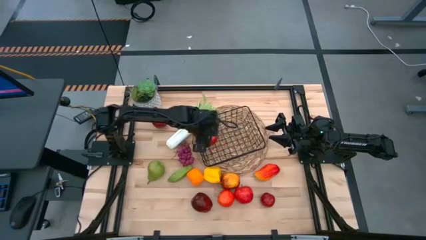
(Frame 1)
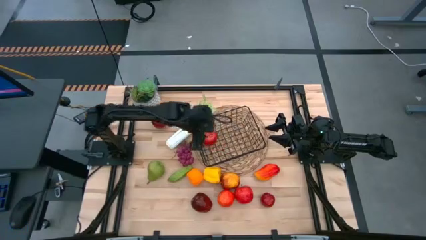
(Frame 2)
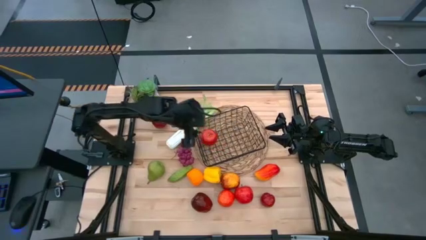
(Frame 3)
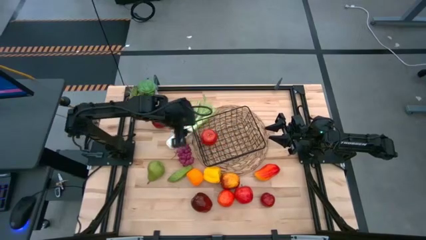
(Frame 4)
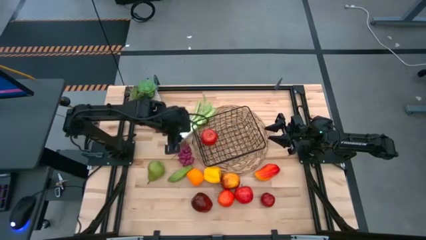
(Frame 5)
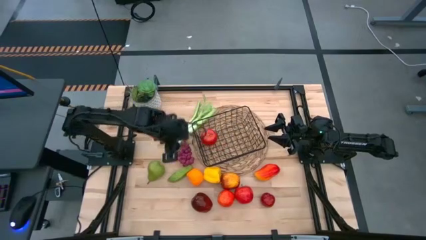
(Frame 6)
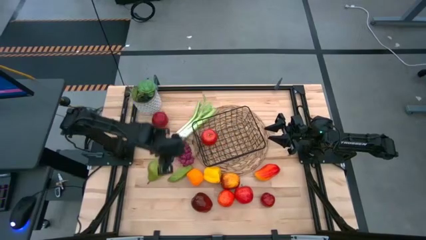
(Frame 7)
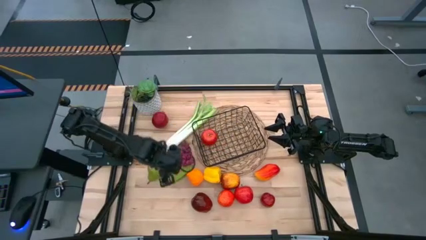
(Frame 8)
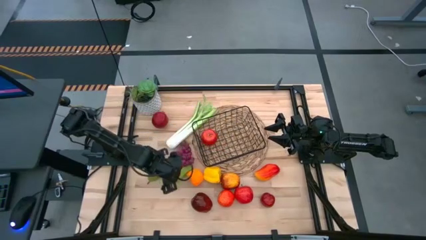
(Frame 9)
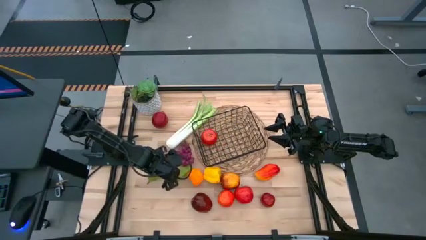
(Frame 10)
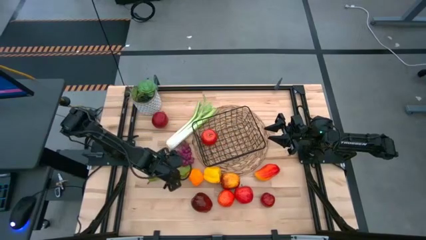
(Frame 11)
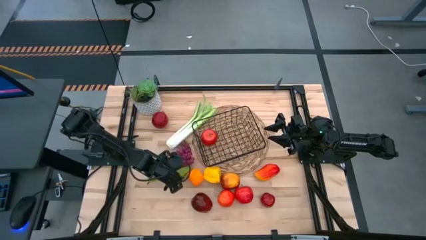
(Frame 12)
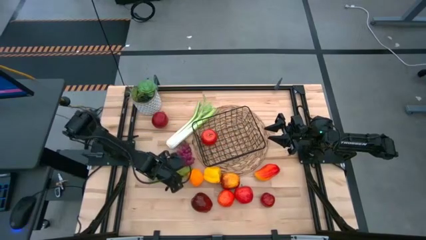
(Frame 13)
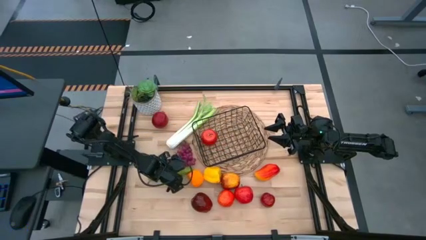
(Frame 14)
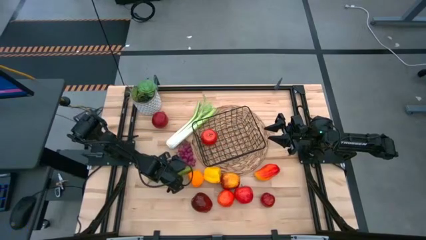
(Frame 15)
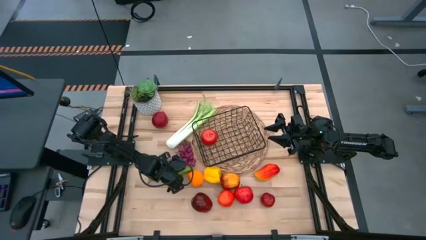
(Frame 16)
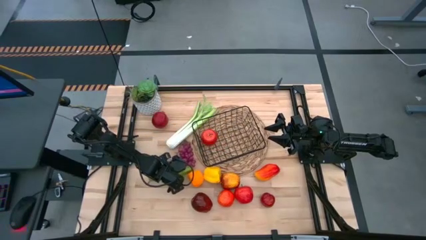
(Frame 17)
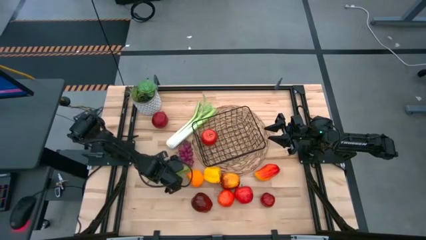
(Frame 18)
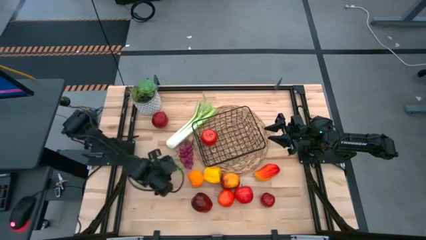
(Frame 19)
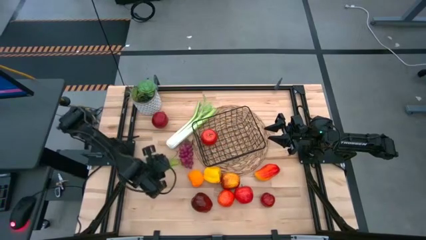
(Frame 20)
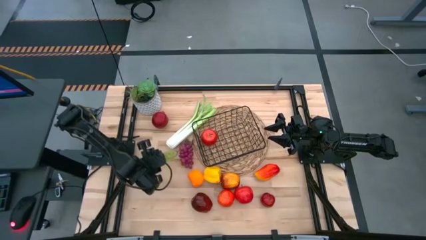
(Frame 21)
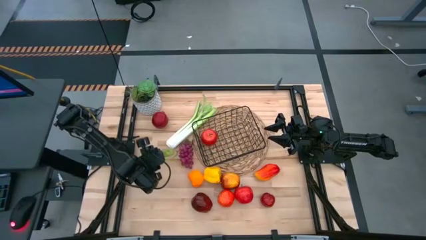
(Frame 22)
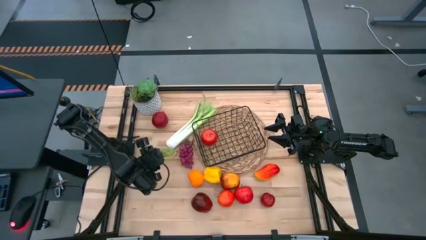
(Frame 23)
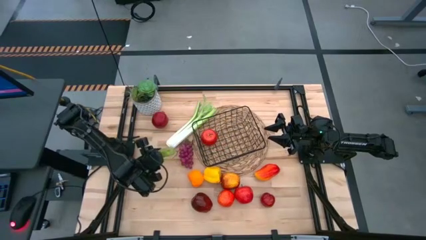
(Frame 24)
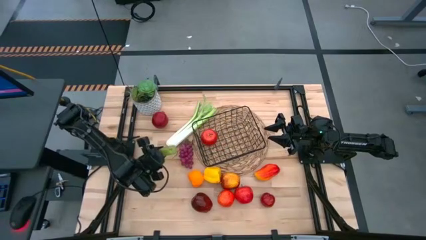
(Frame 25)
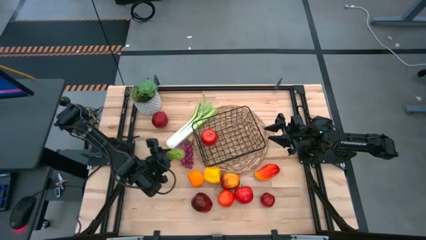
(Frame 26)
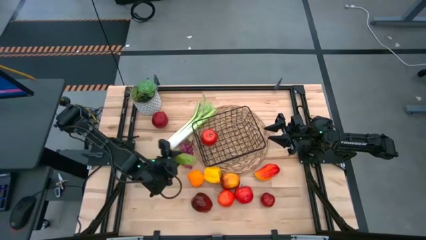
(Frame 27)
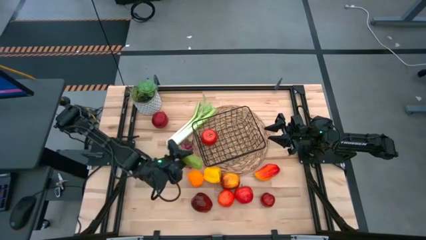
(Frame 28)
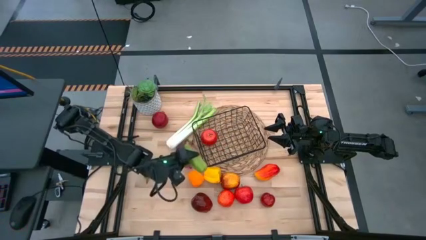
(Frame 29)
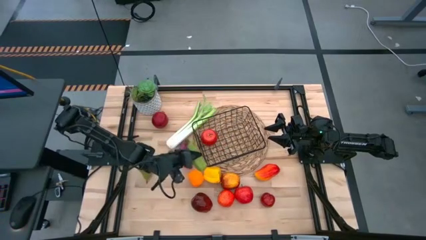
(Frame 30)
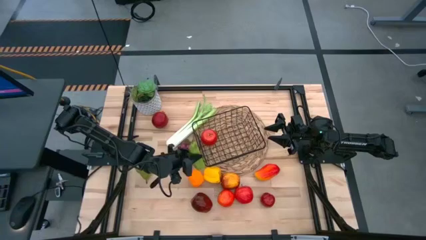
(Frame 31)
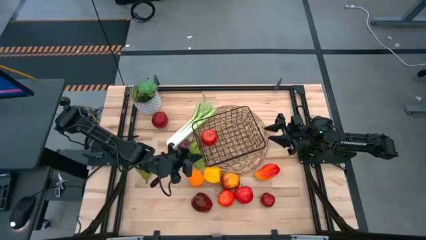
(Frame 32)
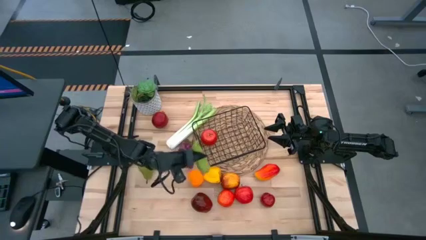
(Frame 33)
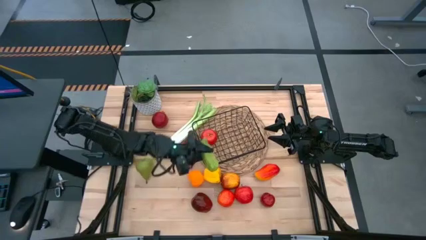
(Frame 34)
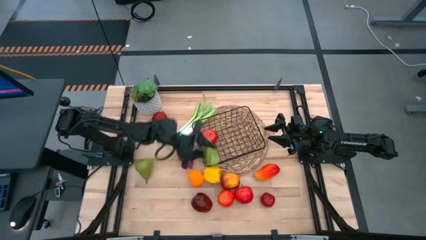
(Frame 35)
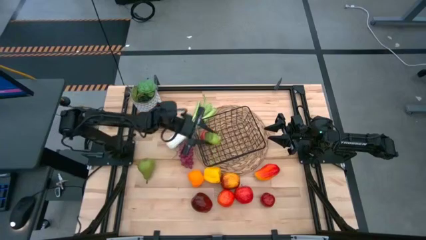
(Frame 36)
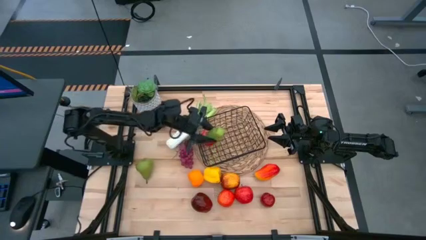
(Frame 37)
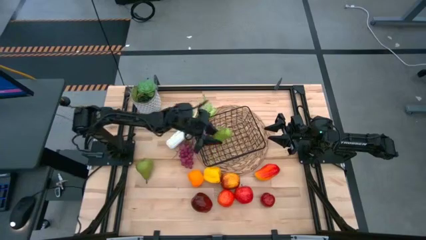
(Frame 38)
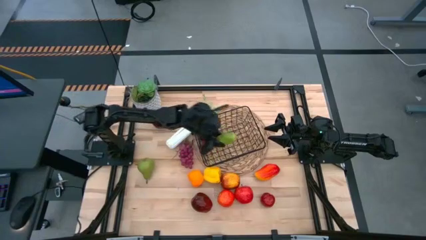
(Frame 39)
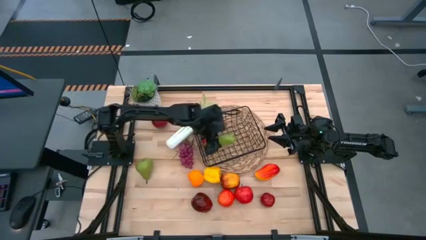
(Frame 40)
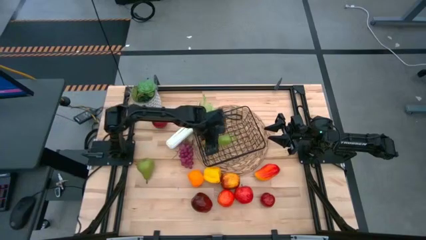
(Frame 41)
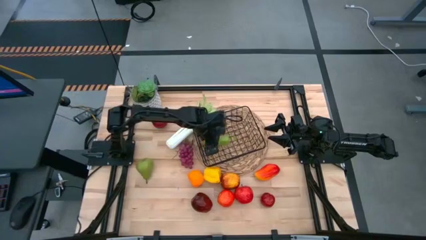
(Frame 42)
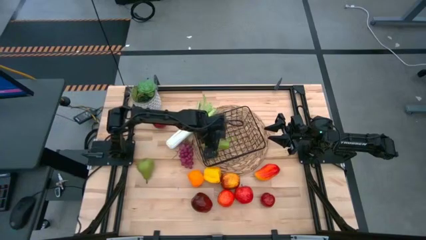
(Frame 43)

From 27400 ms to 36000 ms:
Task: Build produce basket
Put the green cucumber into the black wire basket

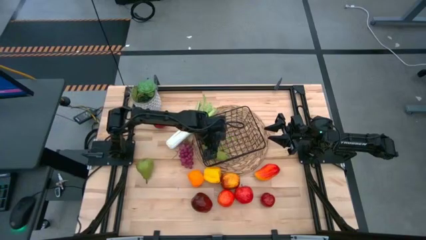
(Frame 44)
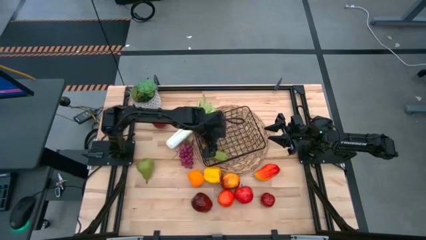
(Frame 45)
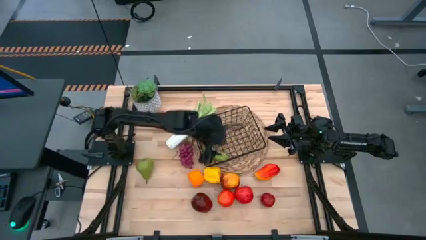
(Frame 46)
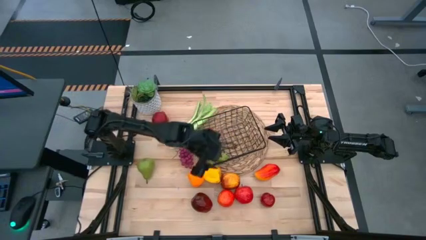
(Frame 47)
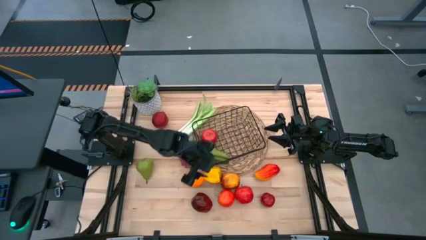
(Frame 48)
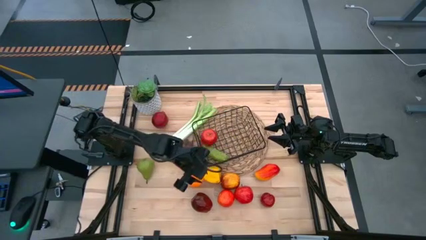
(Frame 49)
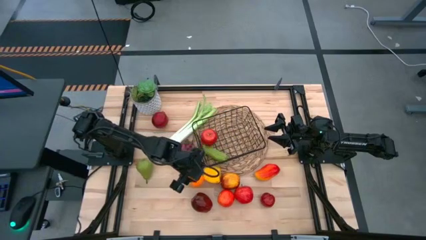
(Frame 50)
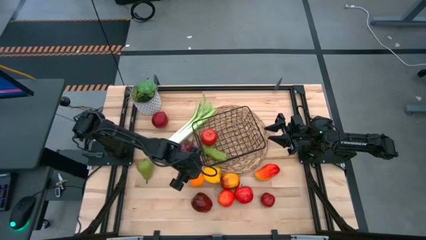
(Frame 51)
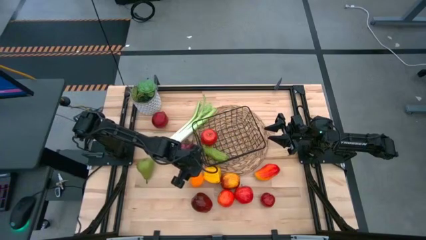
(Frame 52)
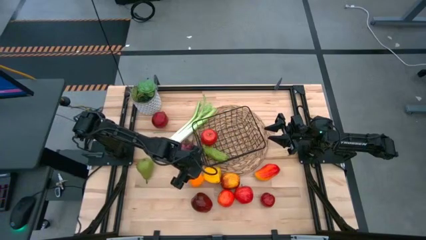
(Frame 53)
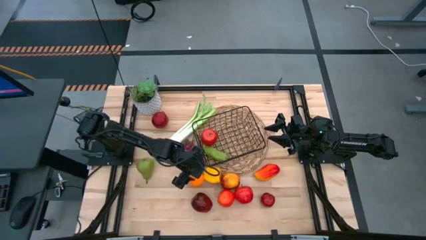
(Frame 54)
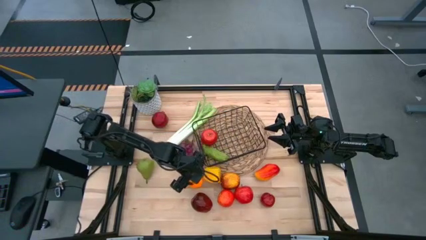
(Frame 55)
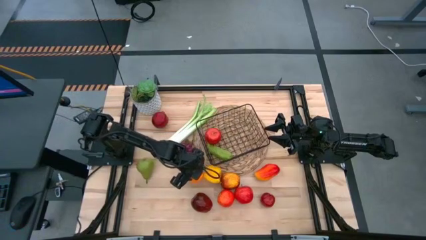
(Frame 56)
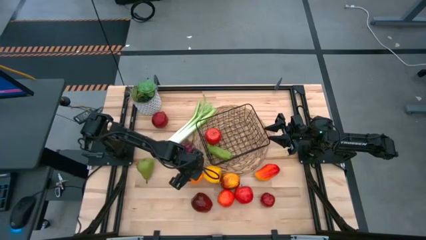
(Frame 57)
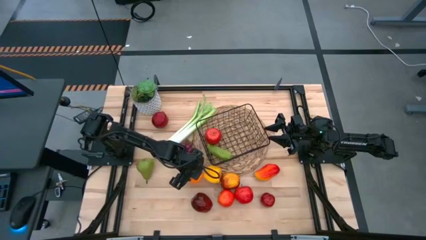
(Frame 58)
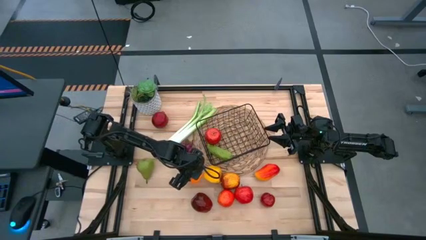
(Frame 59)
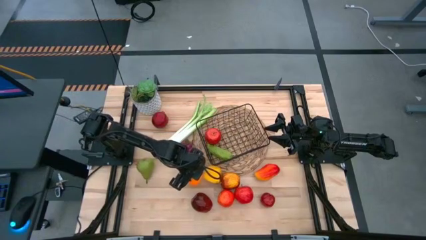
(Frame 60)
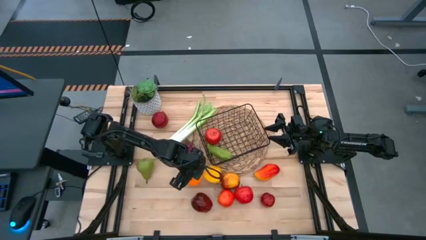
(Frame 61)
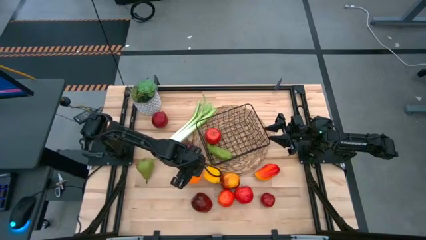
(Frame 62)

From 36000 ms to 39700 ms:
Put the orange into the black wire basket
